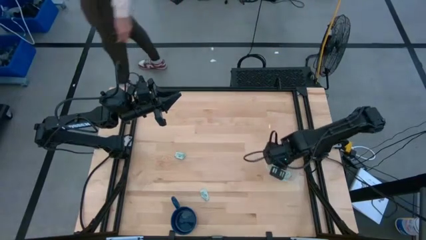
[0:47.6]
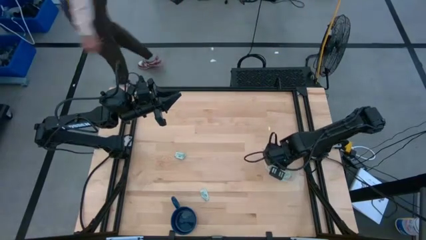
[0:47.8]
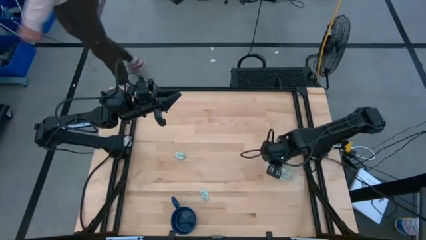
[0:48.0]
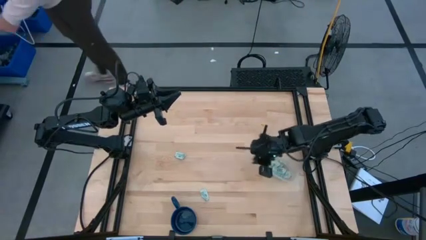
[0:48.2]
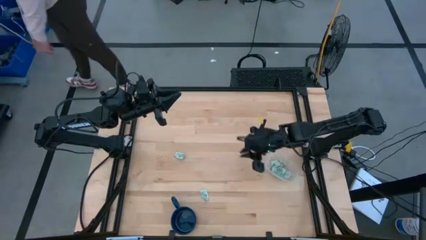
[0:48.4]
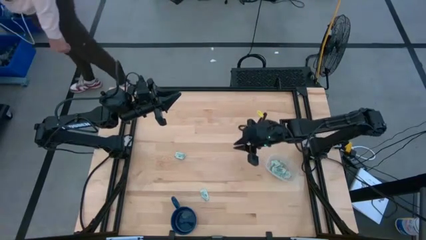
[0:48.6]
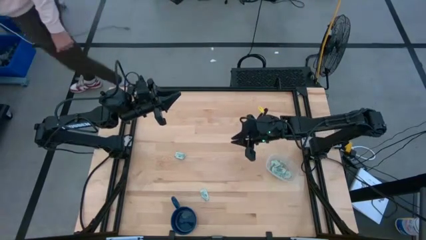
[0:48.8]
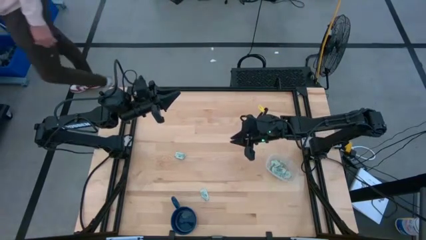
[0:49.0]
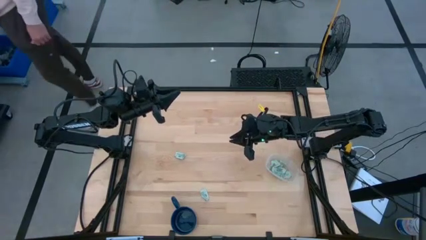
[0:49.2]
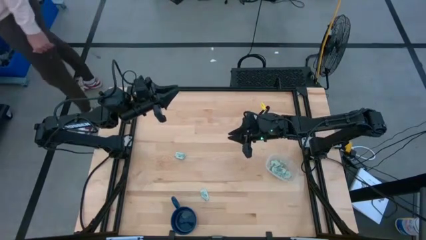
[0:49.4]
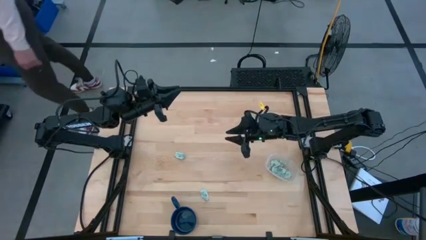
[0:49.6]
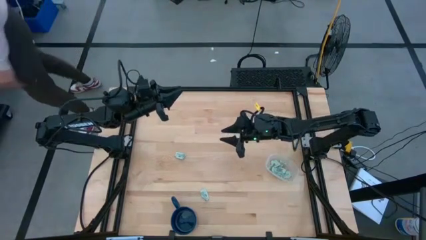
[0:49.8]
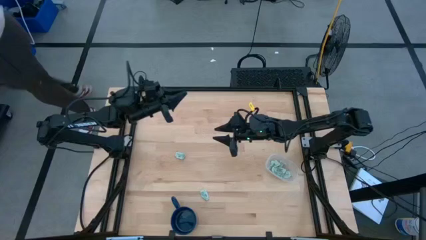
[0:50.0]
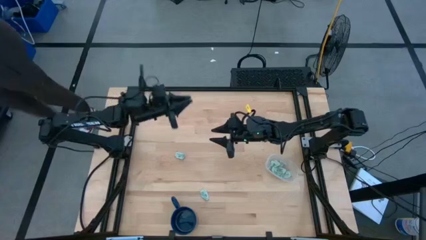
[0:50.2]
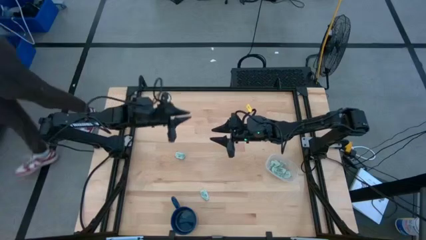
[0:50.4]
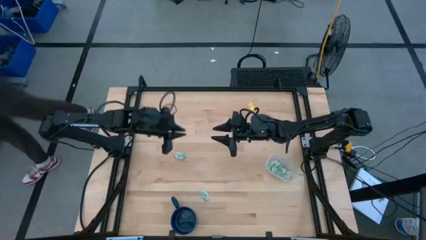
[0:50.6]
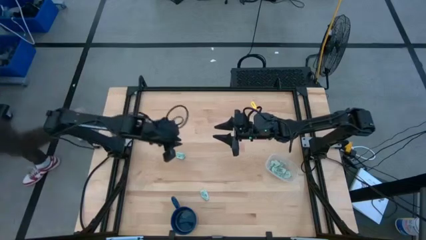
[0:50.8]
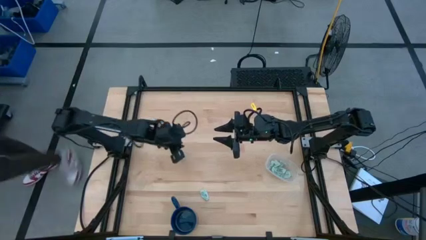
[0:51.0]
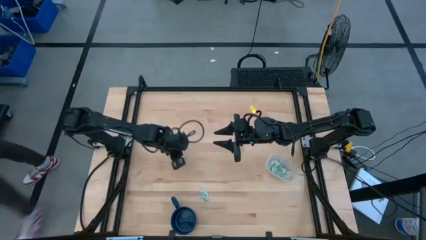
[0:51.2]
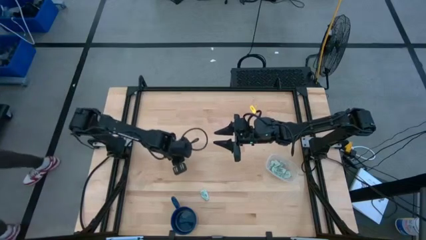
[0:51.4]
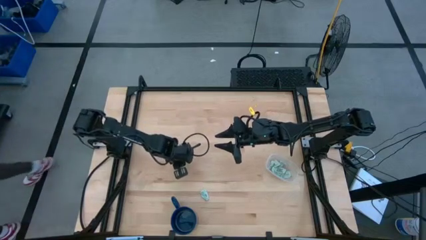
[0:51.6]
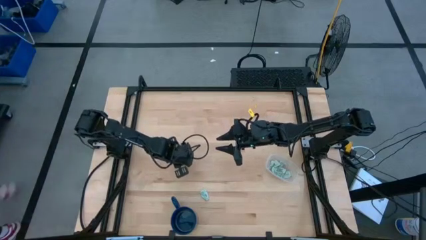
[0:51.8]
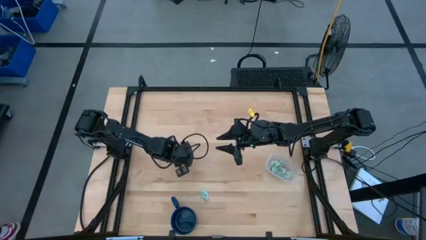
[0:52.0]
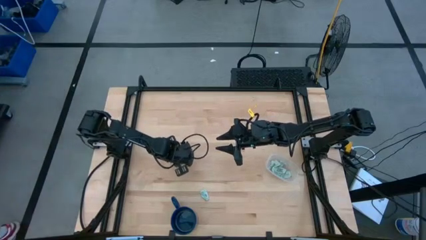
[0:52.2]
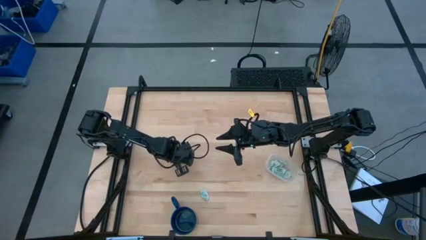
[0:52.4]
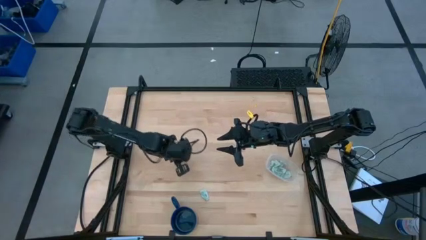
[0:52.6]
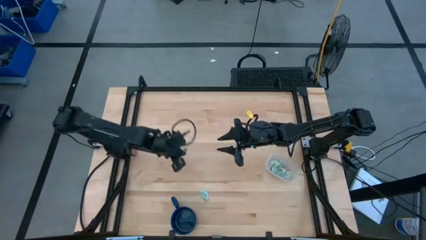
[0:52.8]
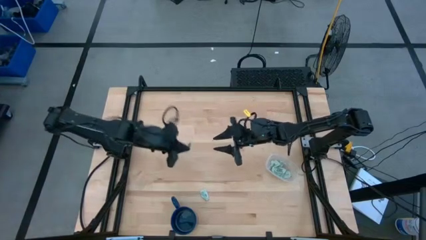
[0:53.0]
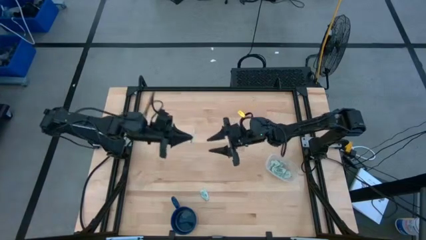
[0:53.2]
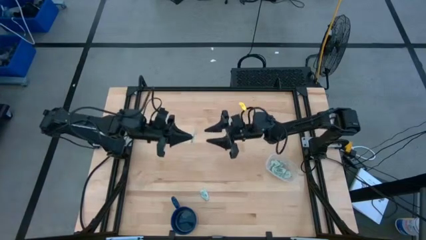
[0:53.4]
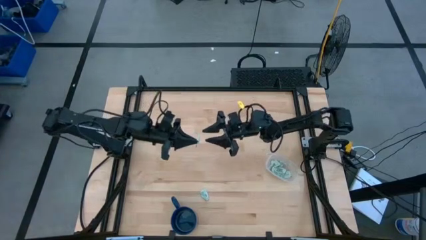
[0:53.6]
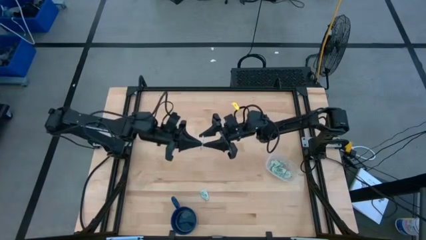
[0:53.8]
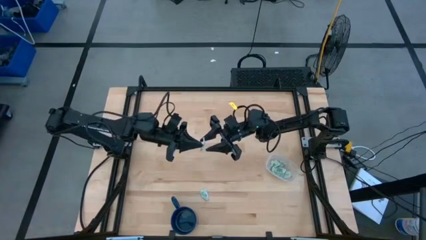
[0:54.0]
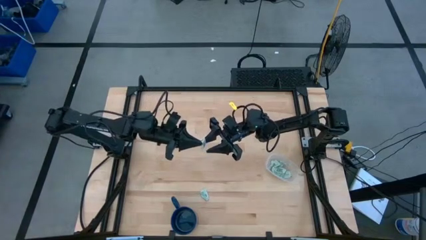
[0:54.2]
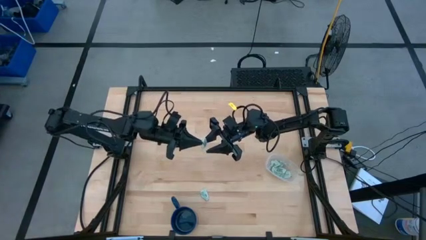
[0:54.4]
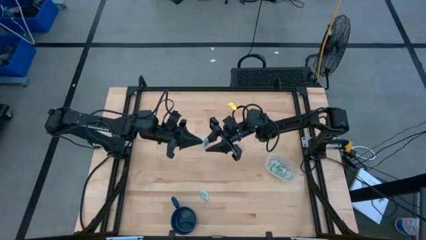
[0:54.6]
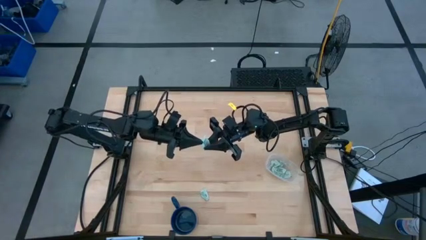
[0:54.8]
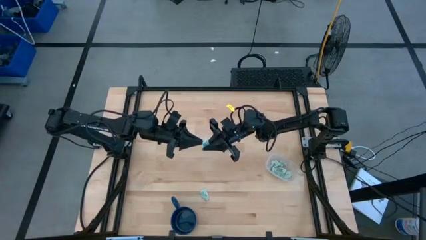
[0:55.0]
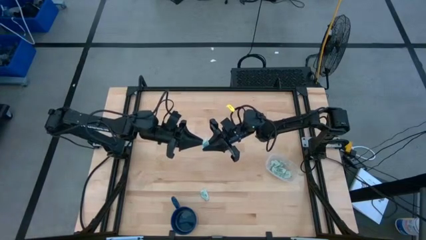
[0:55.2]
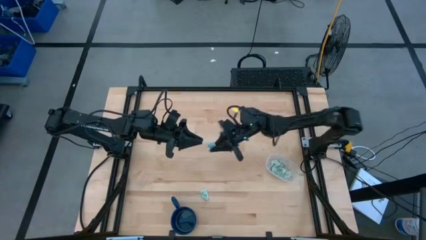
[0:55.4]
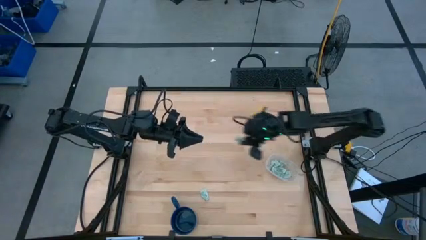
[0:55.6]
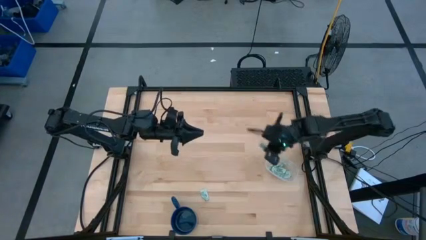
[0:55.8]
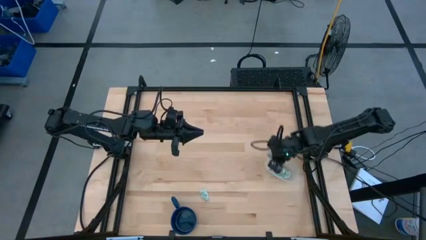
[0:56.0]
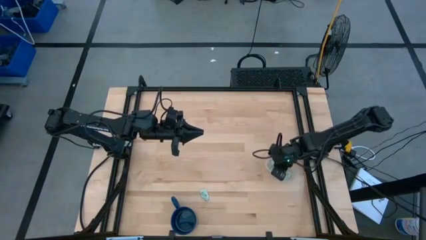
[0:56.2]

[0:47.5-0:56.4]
Task: Pick and place Stevia / Truvia into bins
Put the green stevia packet into the transparent container

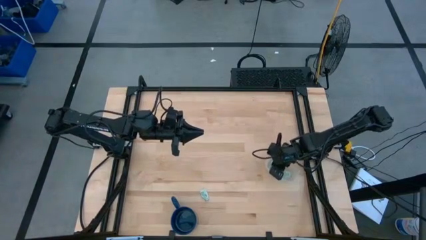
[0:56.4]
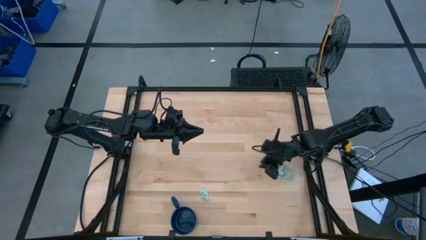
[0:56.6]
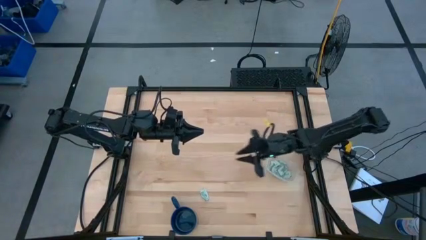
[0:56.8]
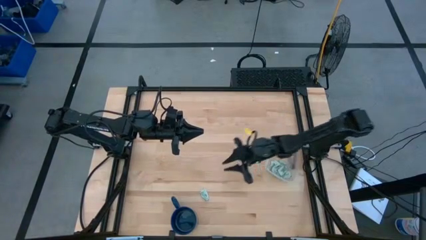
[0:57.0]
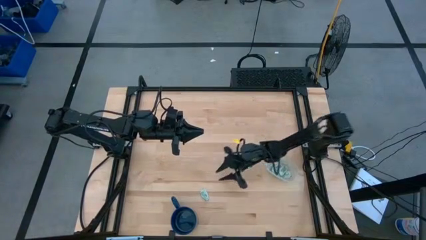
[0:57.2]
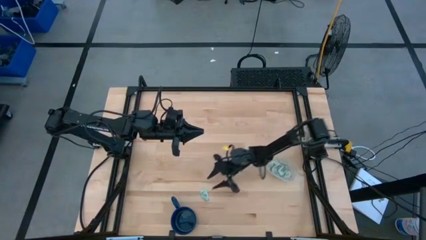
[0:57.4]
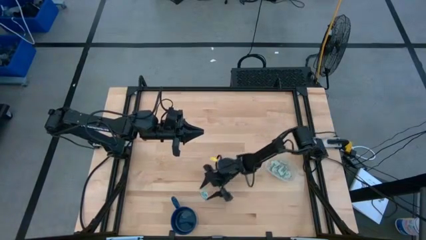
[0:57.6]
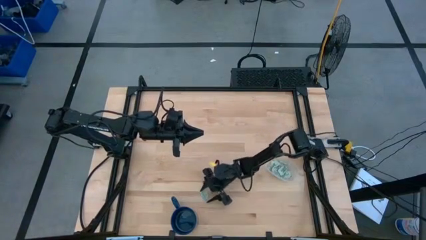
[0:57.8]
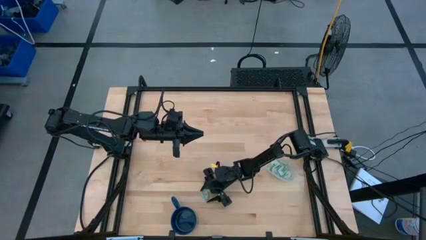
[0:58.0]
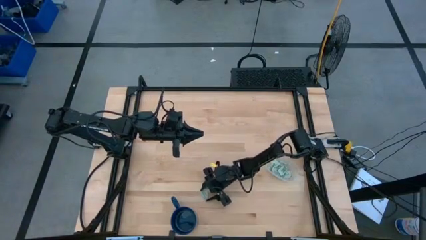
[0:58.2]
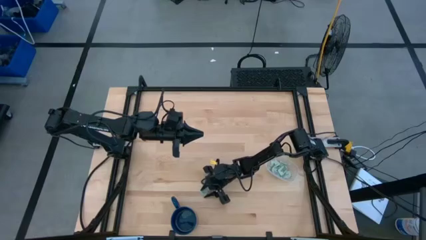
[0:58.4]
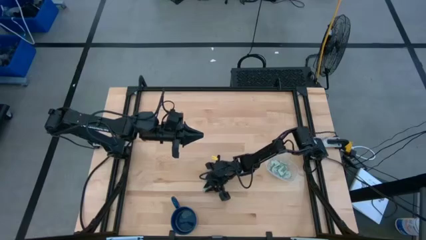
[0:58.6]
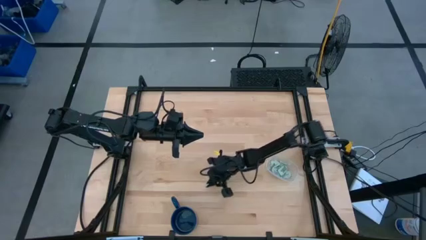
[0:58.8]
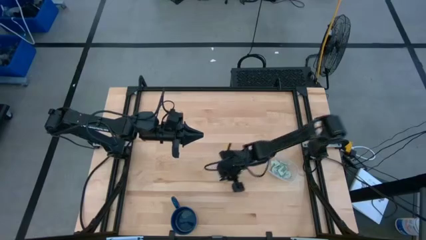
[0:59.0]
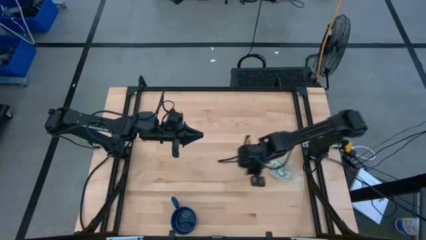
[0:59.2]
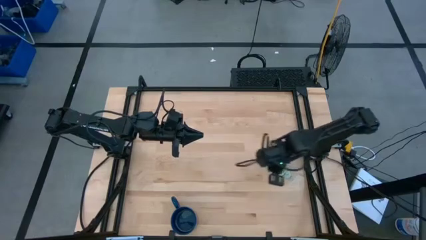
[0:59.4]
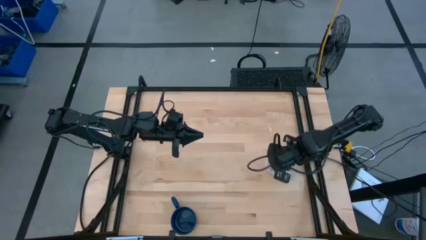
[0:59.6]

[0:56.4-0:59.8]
Put the green stevia packet into the transparent container

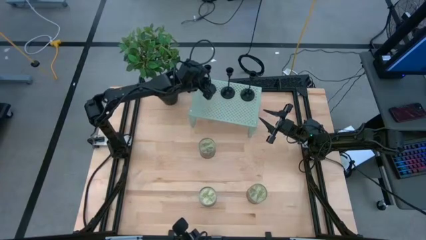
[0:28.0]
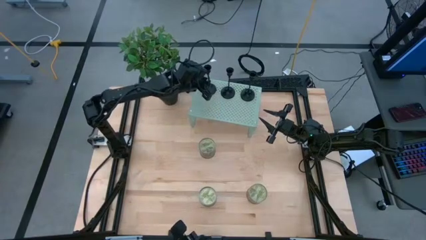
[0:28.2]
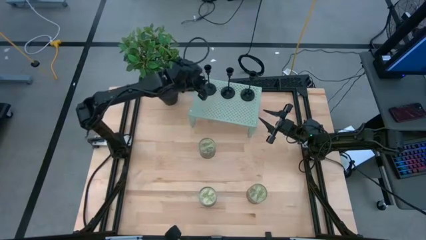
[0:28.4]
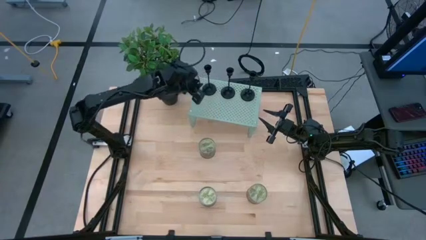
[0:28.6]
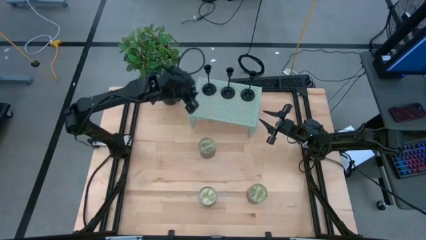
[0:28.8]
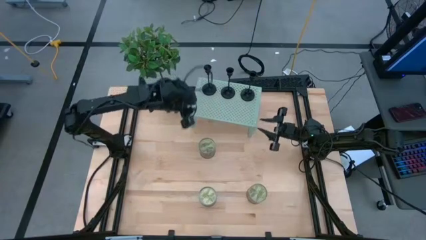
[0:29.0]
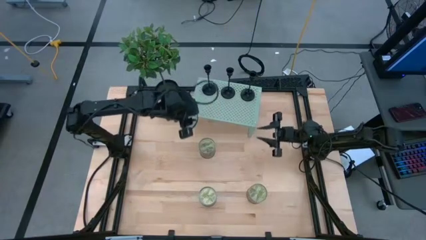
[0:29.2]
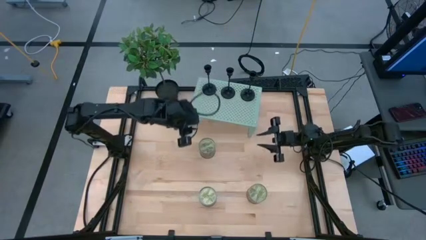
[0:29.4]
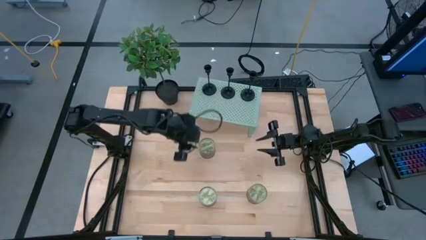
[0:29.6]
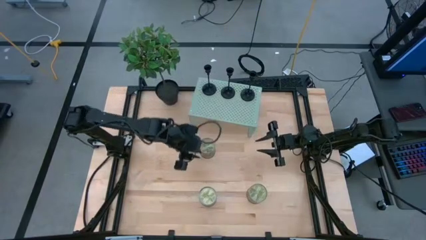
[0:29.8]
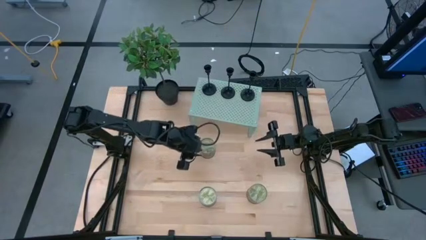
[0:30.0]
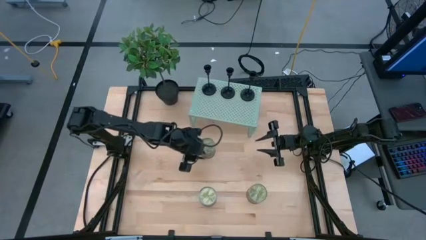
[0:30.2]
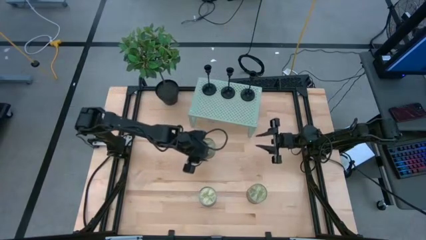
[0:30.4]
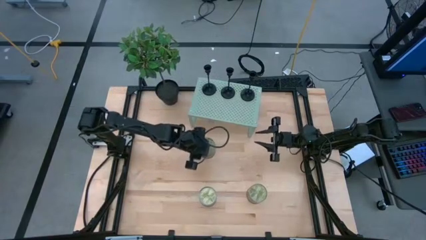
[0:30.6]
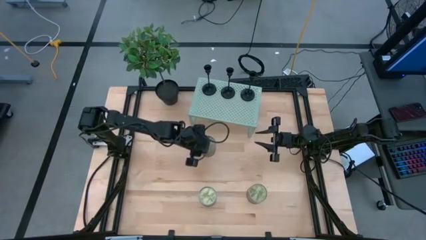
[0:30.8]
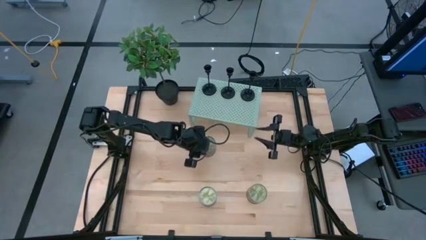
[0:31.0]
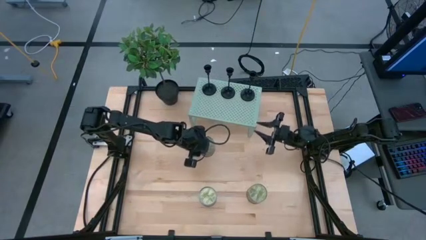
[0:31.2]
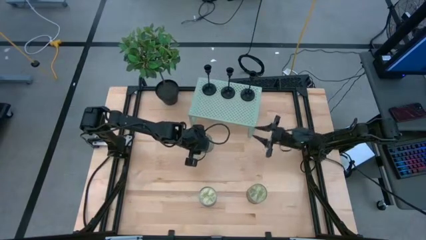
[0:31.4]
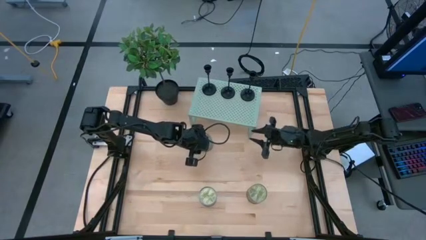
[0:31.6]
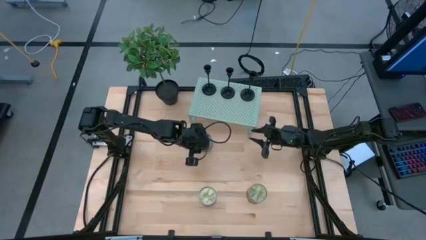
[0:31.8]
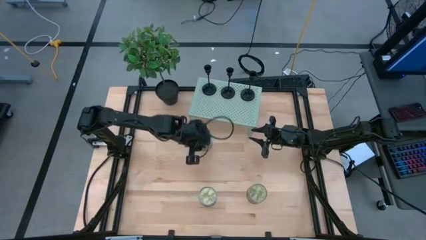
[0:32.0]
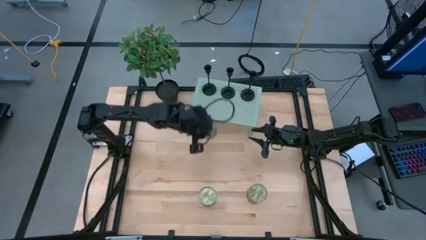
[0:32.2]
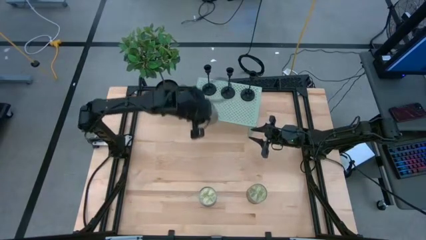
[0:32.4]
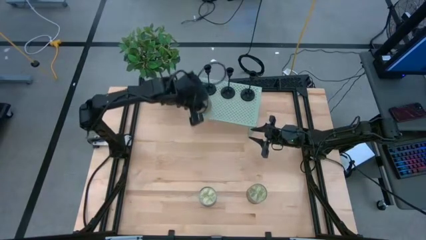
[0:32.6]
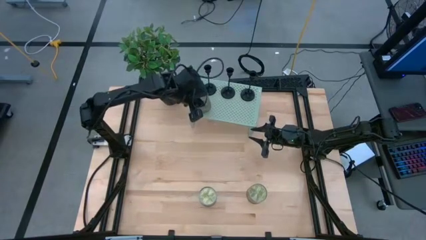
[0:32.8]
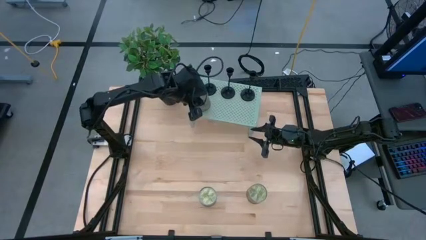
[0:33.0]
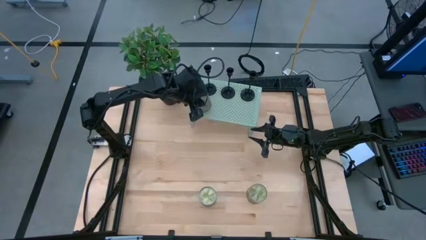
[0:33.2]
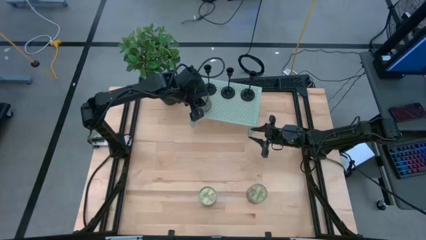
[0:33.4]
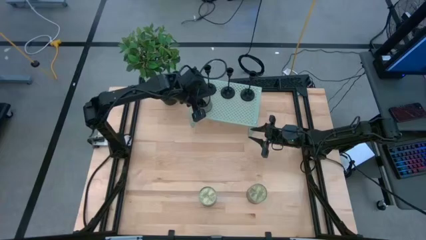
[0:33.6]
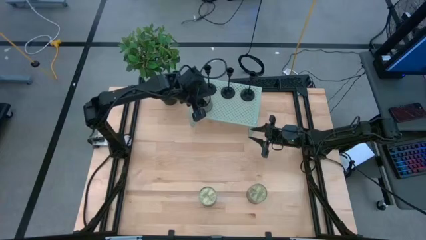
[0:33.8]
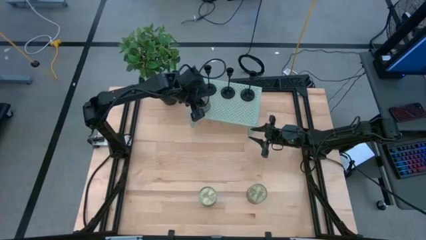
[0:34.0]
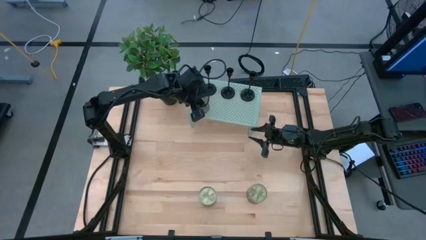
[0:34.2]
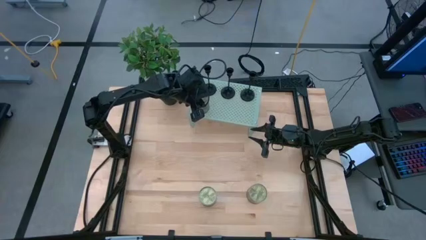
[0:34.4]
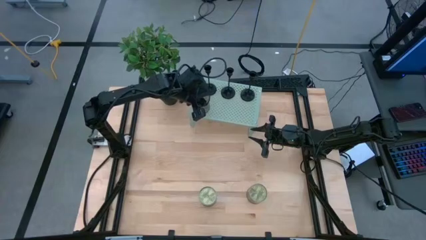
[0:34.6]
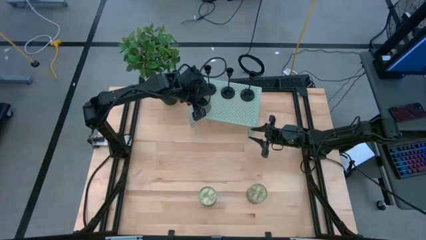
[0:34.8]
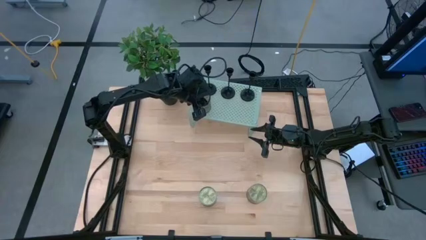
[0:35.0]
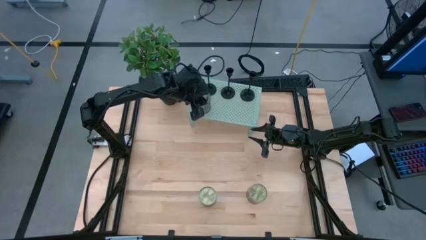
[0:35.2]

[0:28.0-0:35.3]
Task: Pick & Place candle stick holders
Put the top scented candle on the shelf
